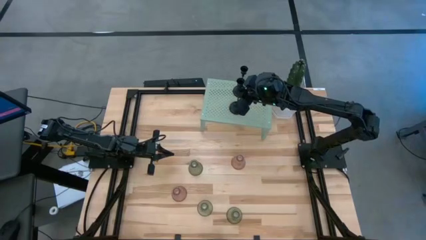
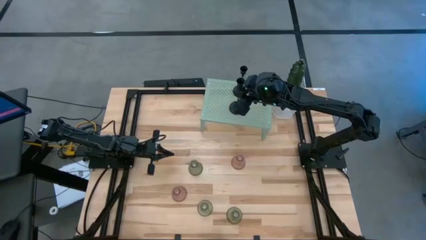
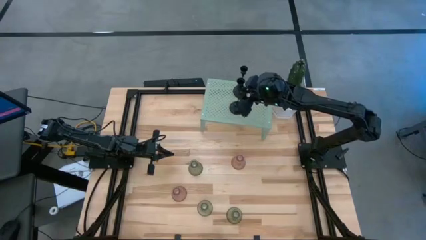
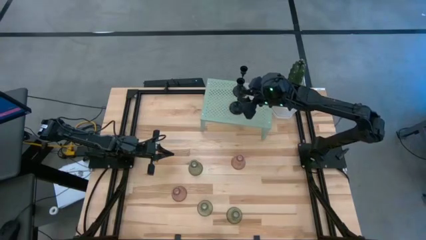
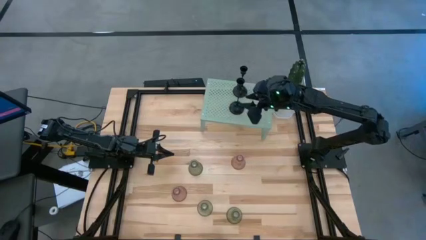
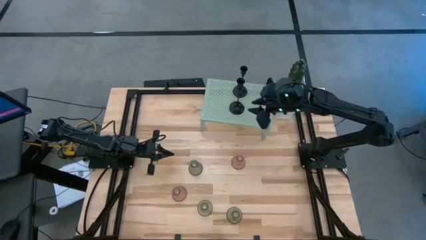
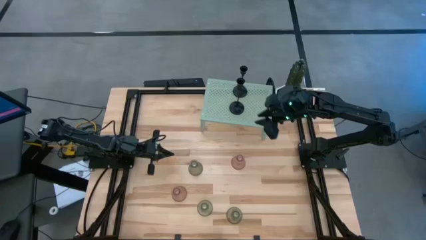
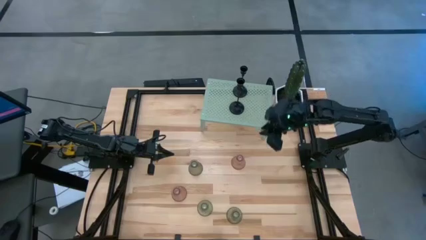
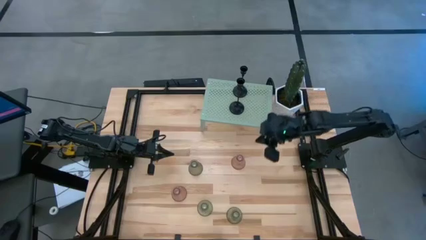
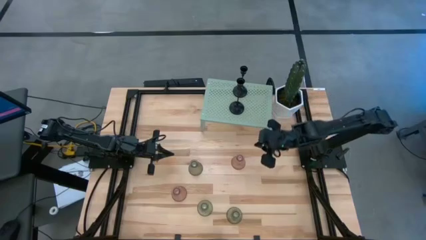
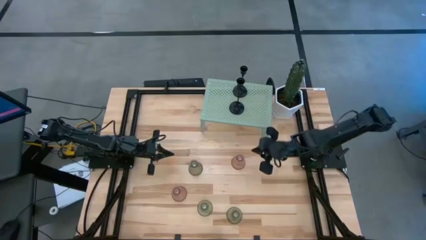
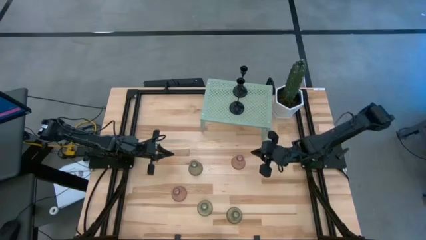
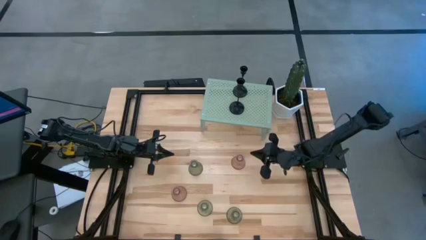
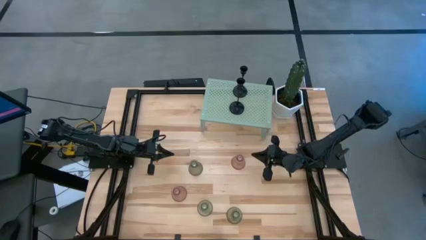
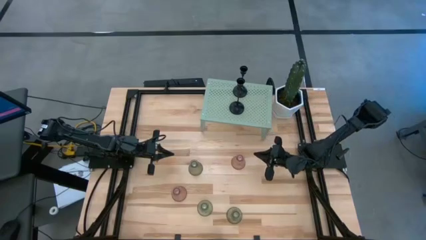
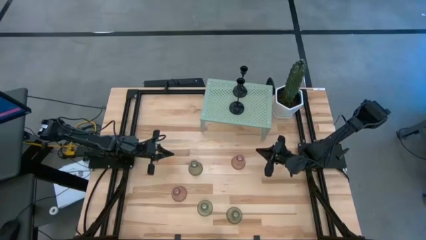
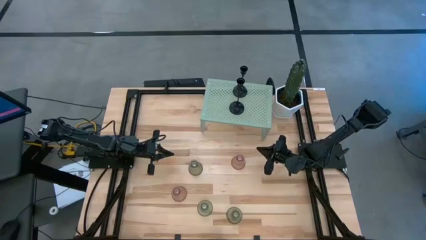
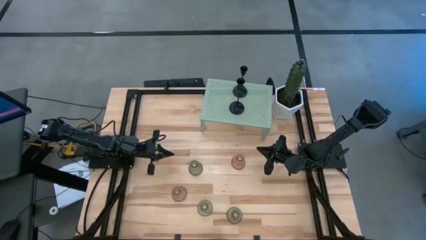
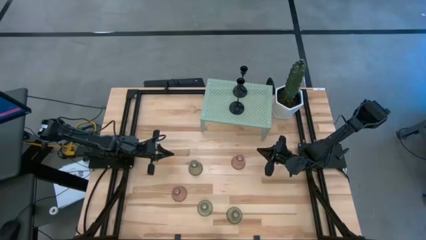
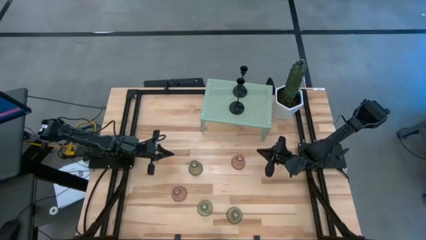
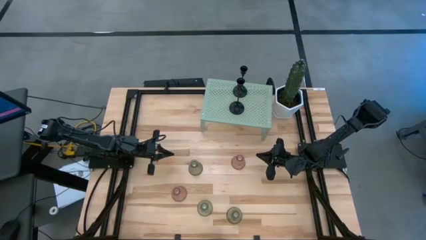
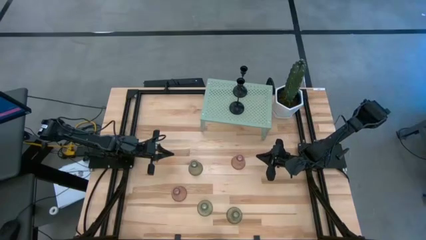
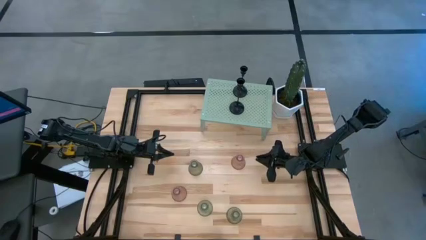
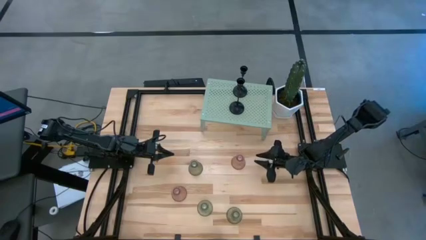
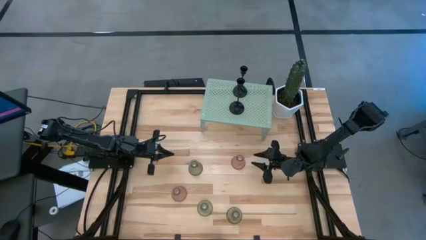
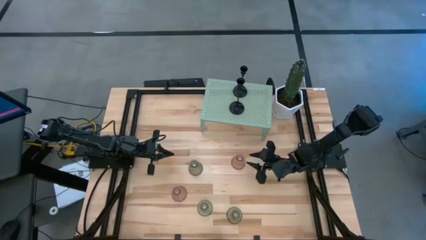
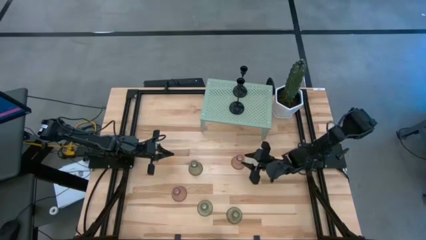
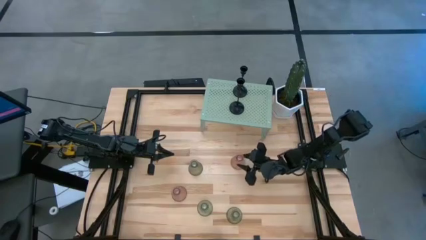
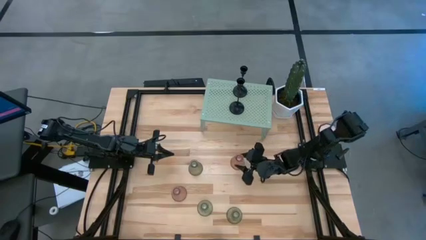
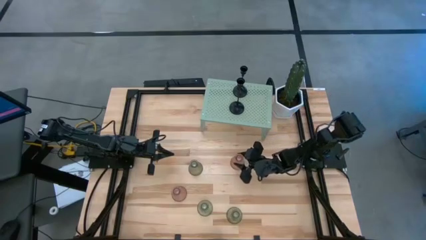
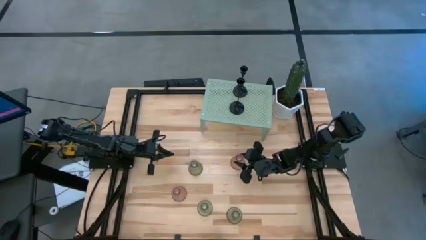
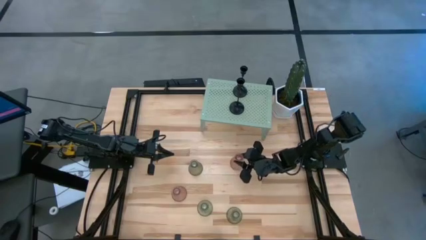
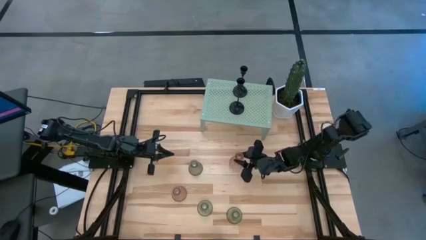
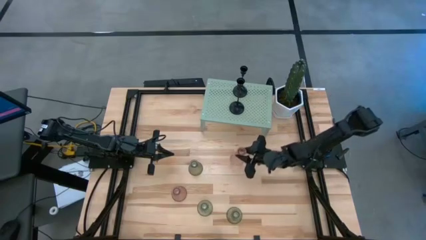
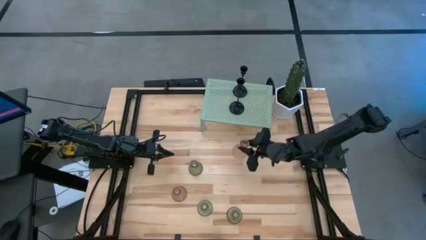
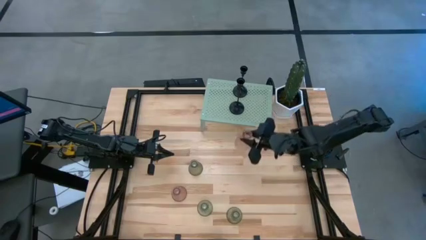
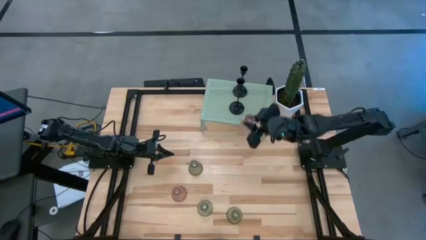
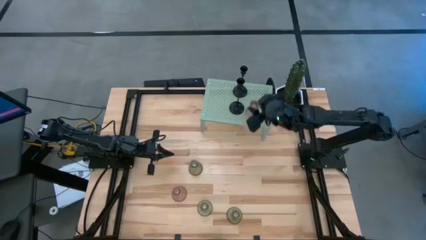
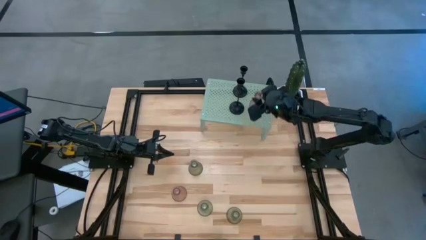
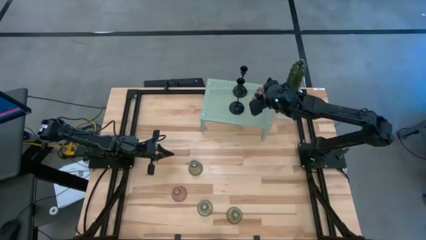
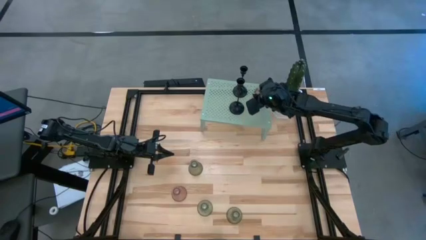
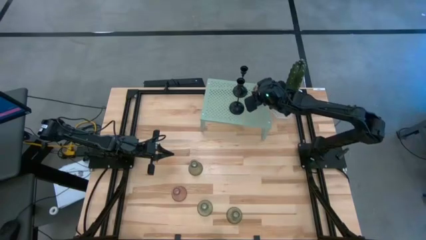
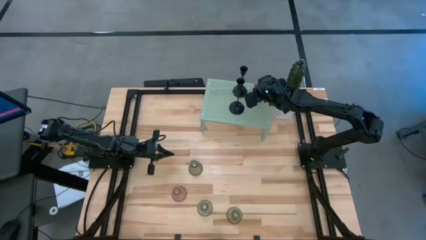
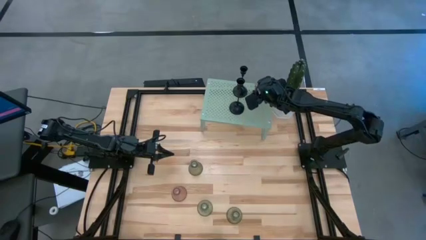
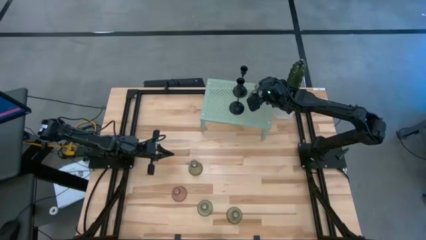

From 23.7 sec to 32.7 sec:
Task: Pick & Place candle stick holders
Put the right pink glass candle holder on the shelf

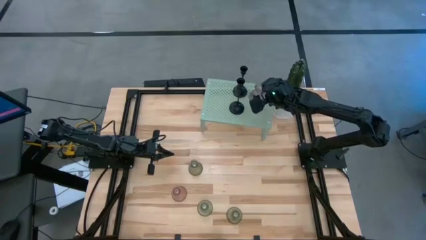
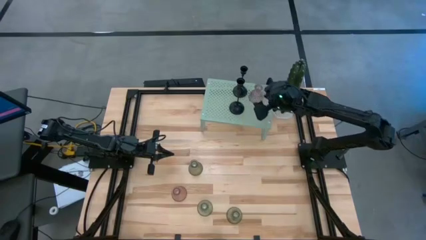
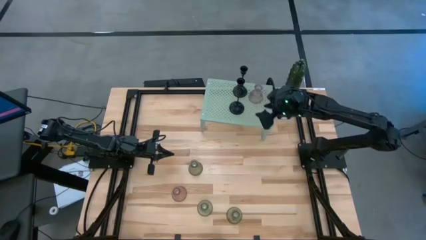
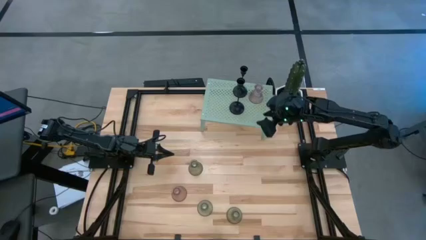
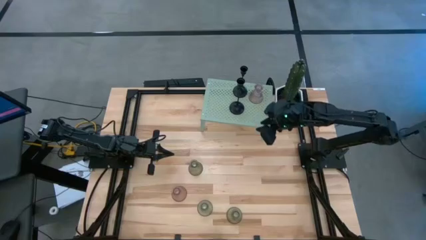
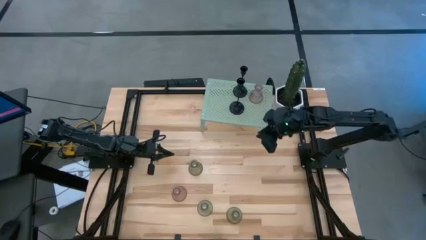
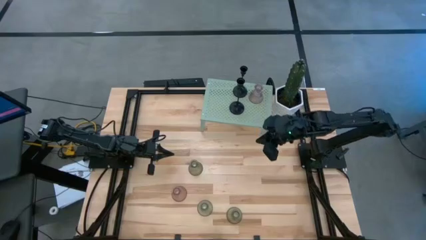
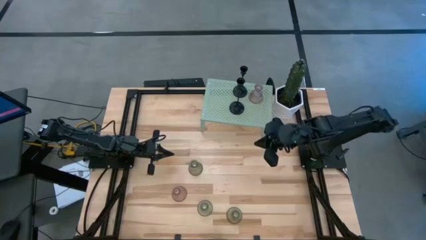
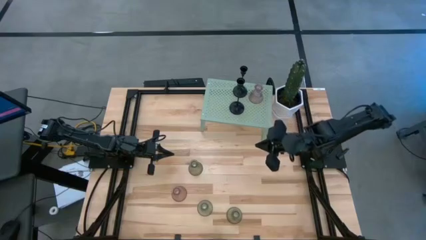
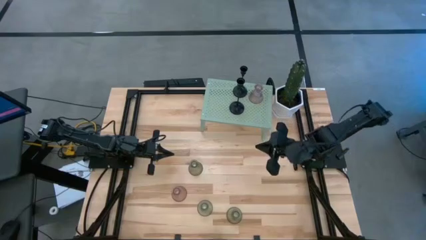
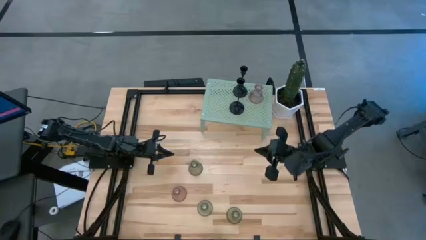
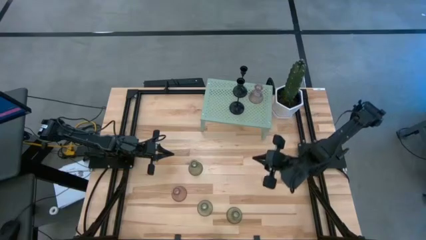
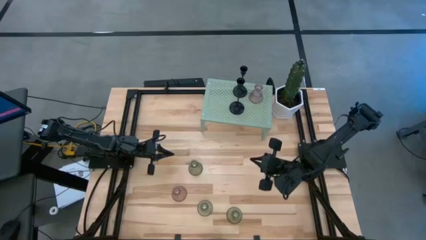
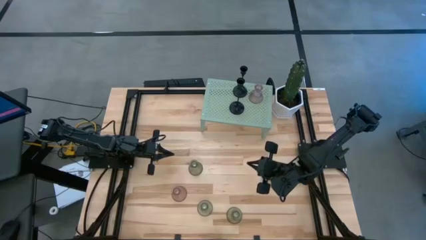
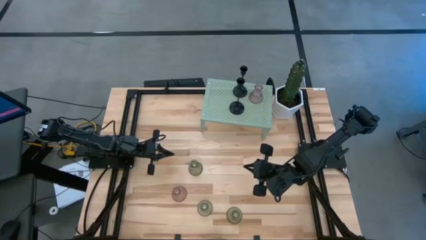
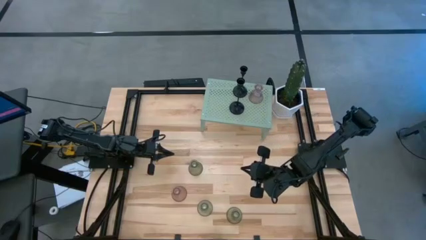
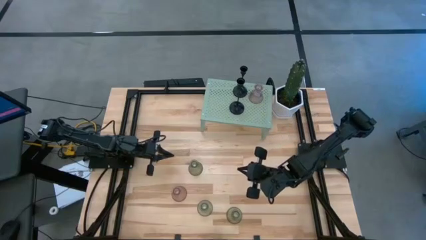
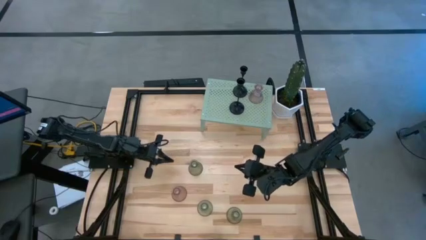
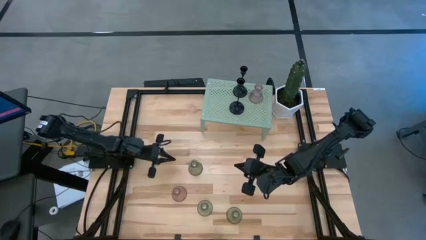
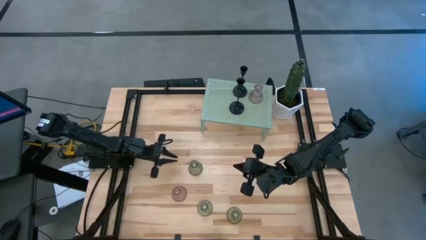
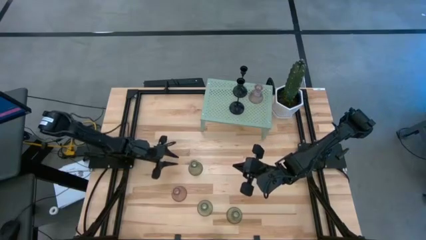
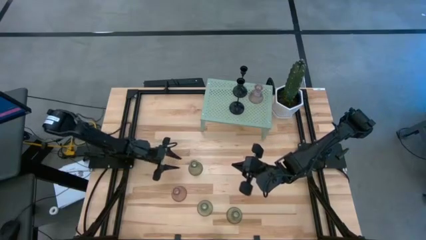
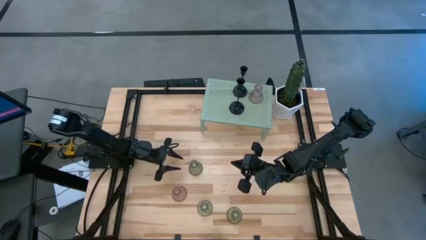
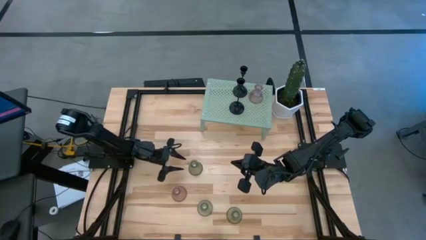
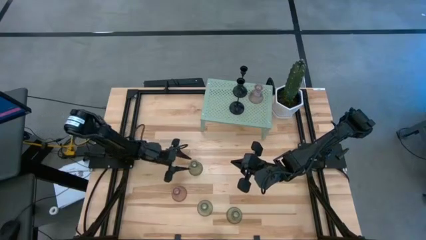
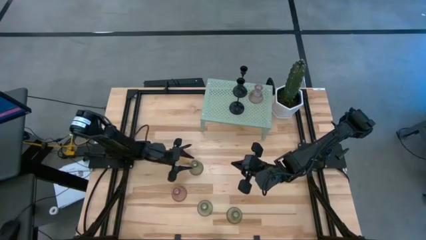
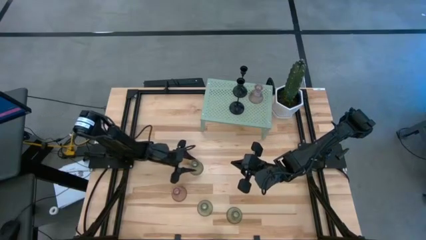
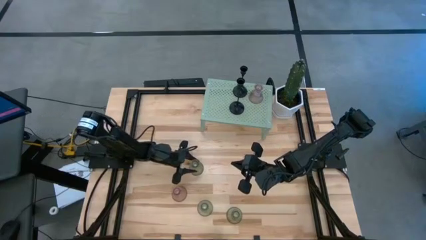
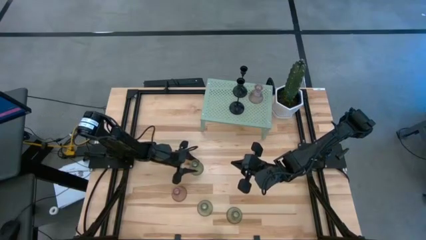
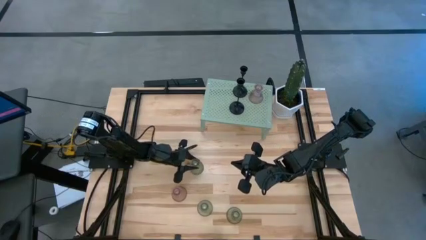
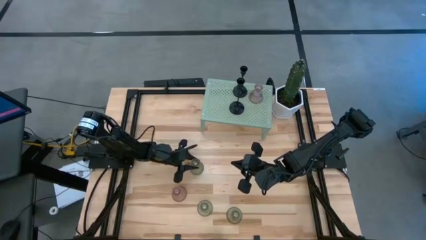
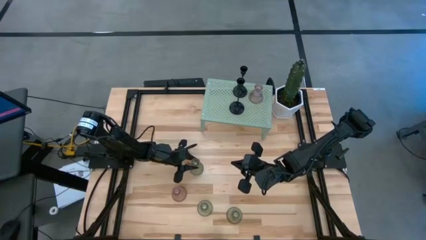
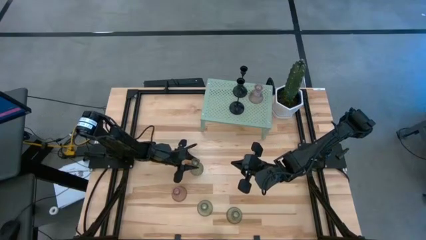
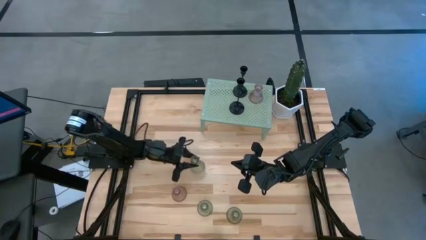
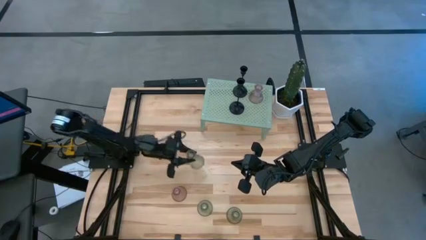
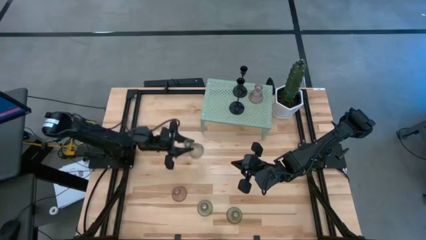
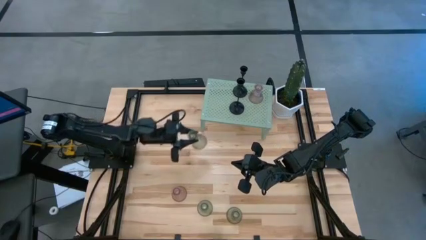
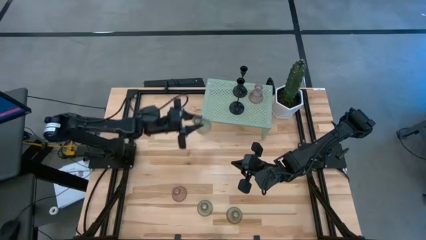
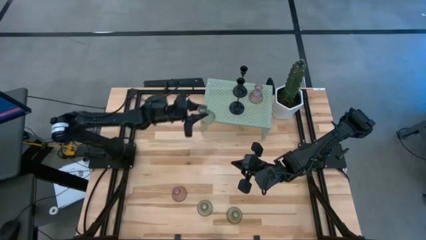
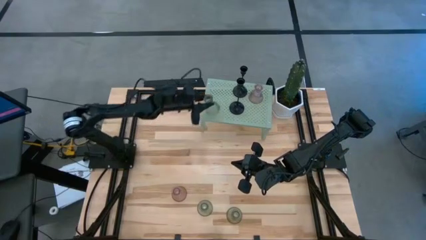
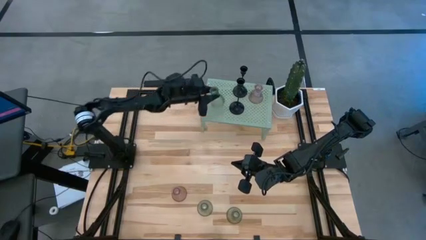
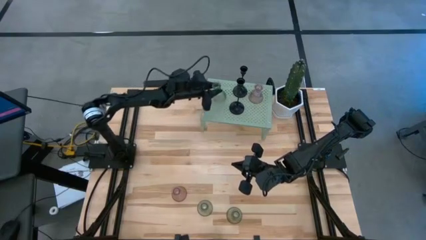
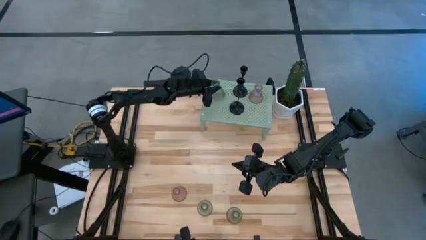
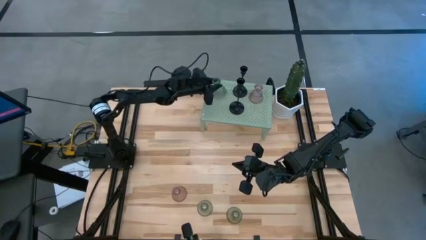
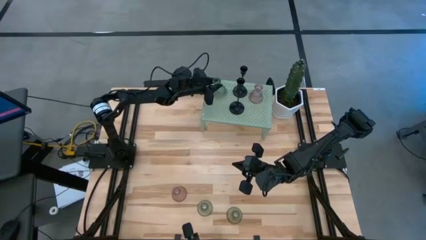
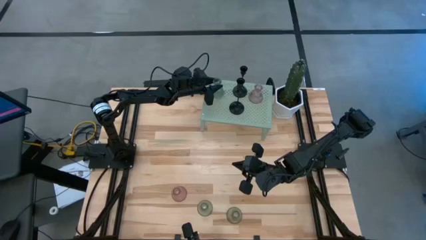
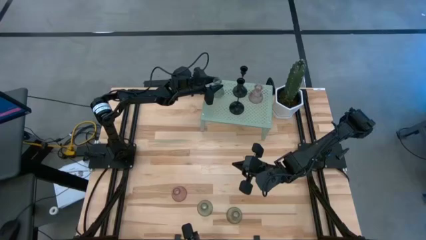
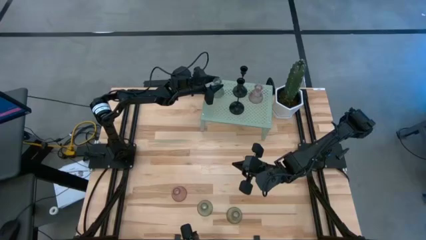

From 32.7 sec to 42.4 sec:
Put the top green glass candle holder on the shelf
